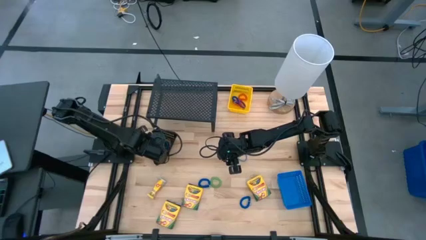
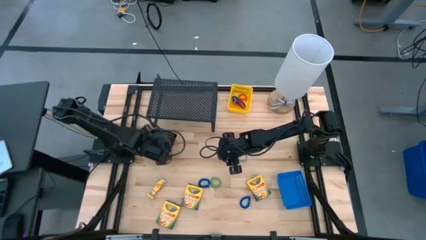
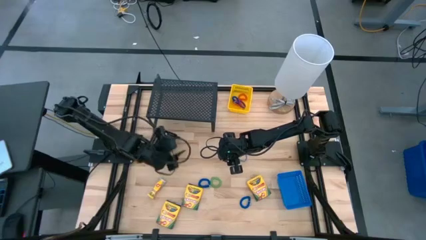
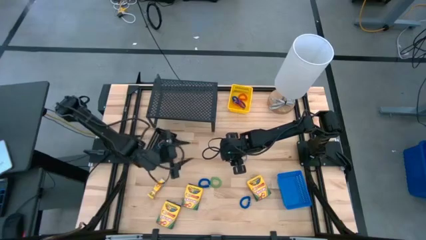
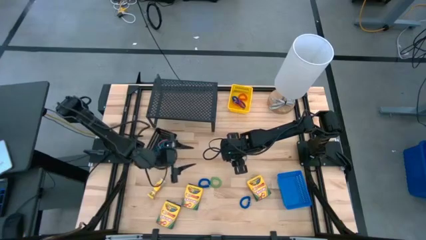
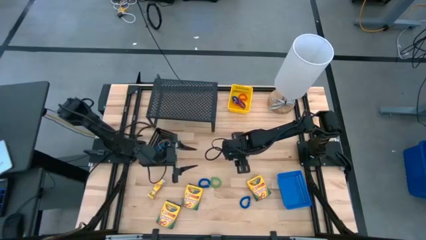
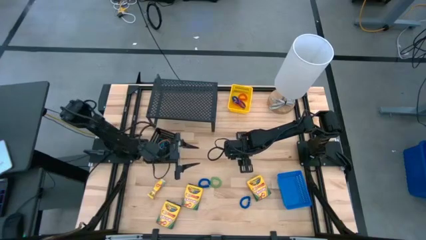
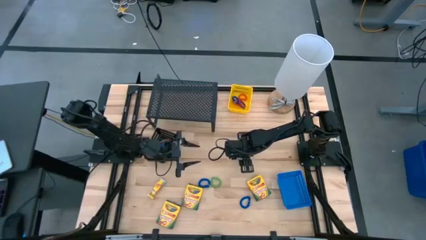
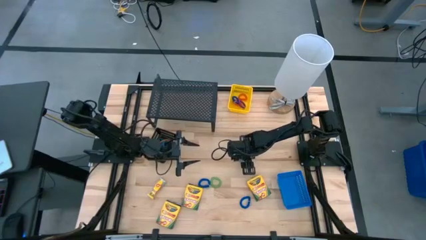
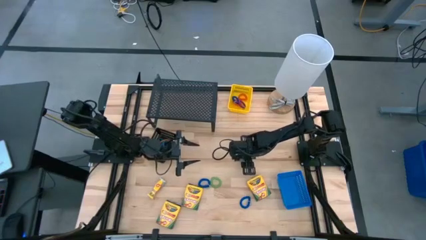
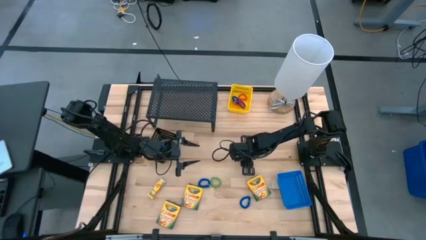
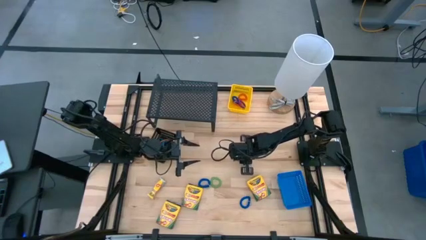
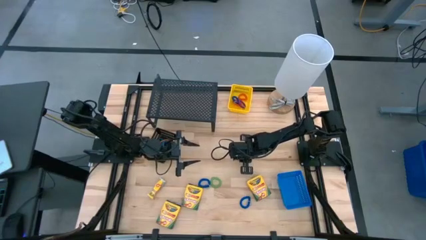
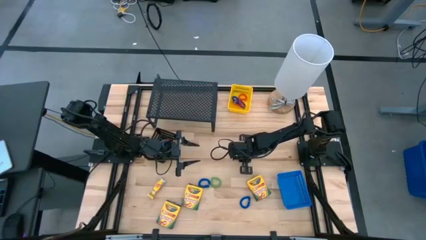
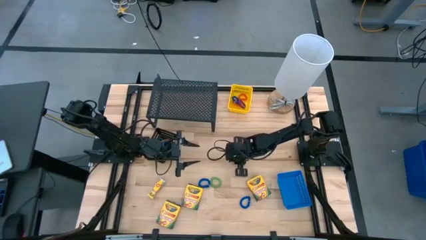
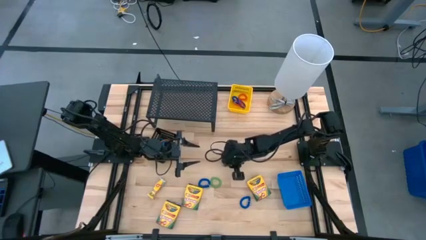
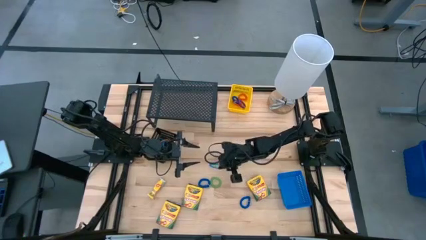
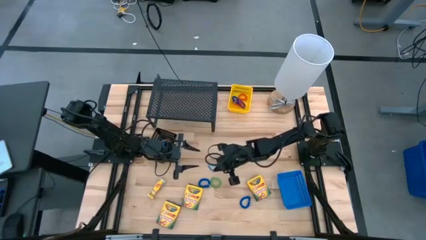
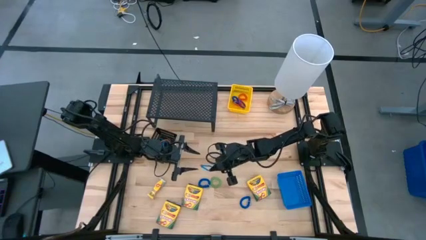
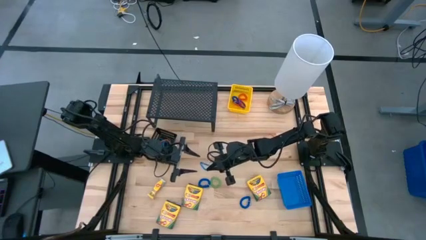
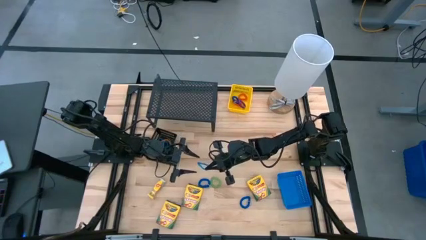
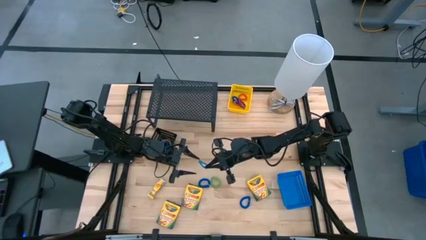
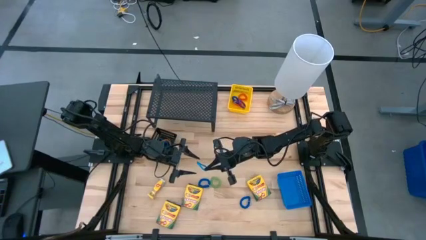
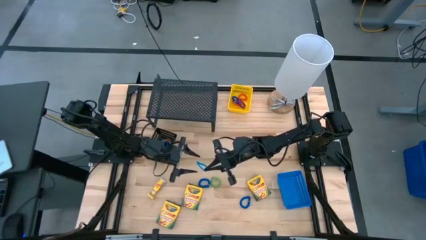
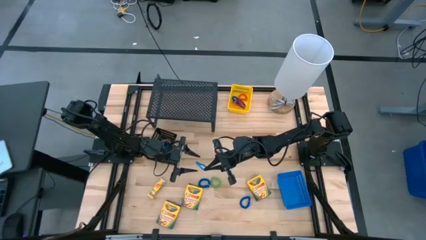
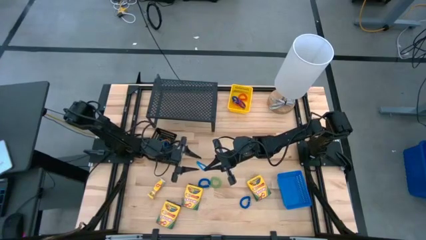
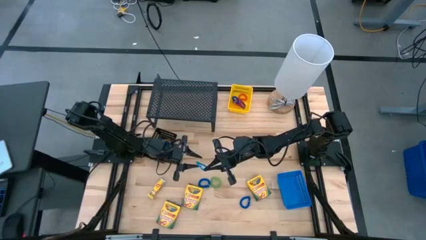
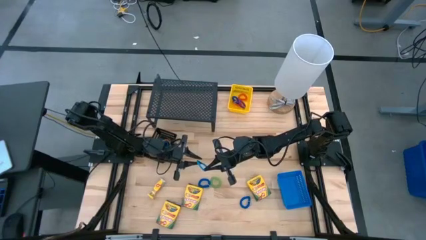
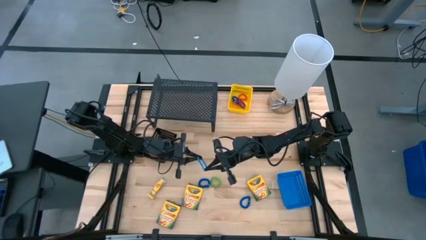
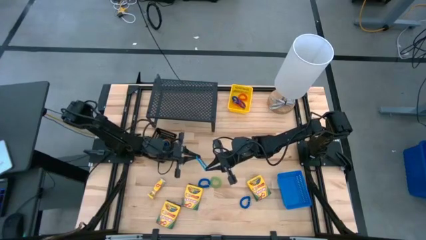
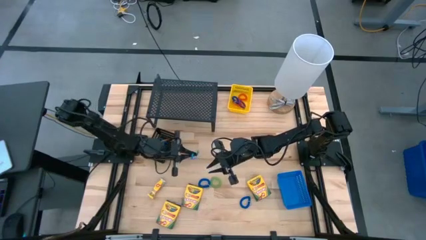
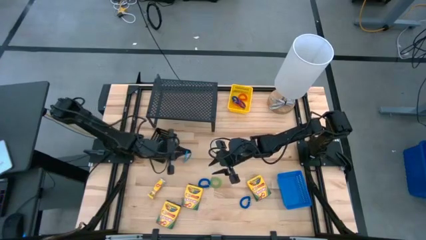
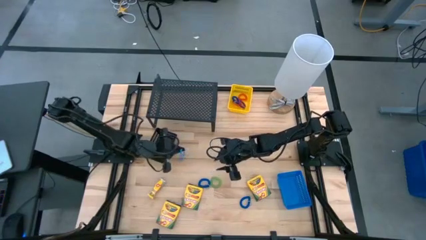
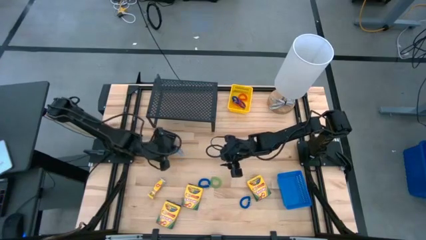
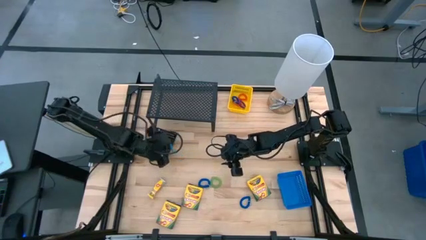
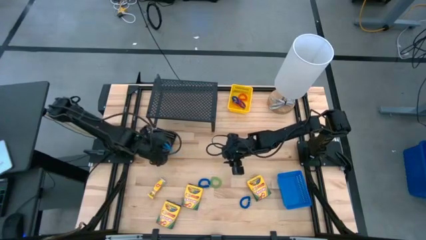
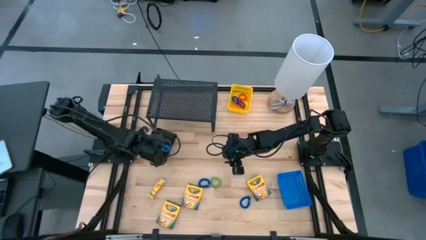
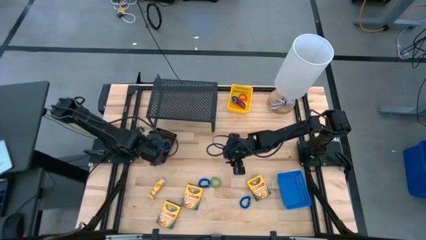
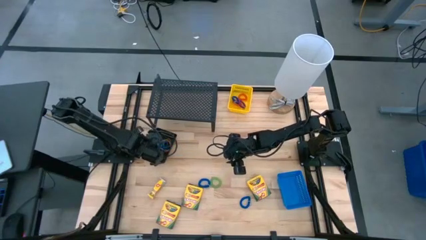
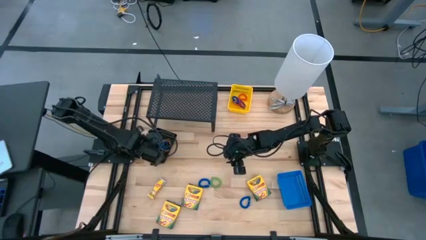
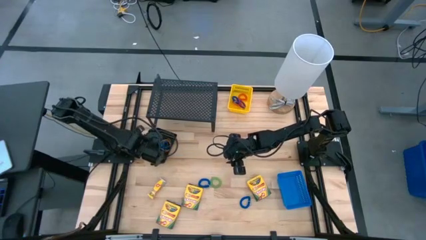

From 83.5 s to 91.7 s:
Task: Pick & Place Office Desk Supplies
Put the blue rubber band into the black bin

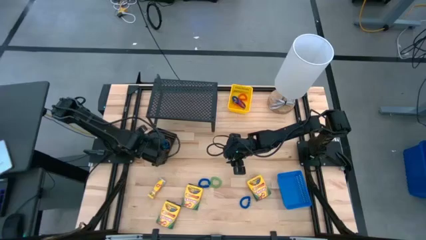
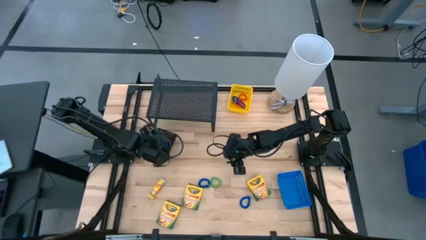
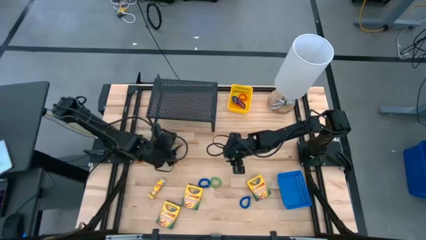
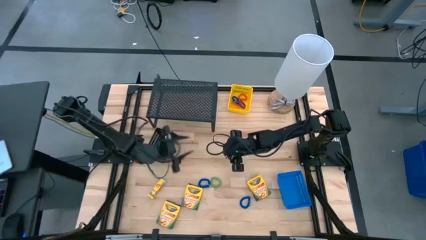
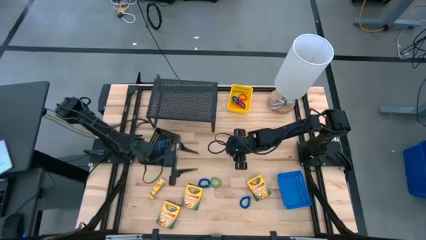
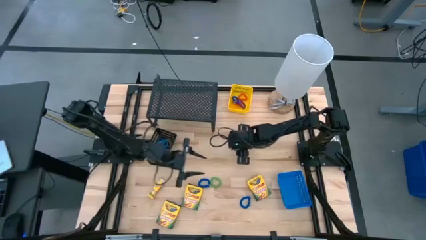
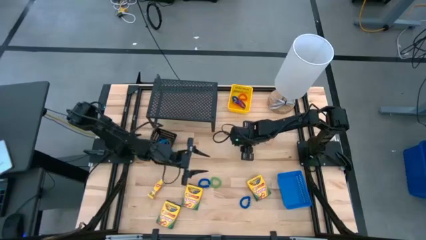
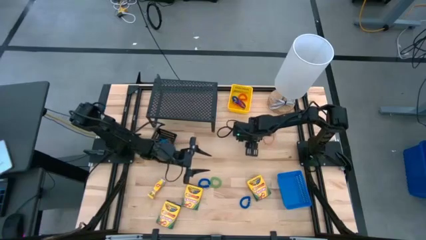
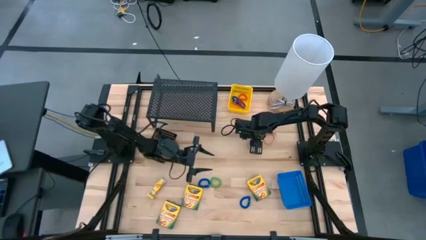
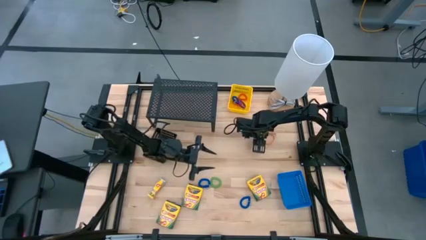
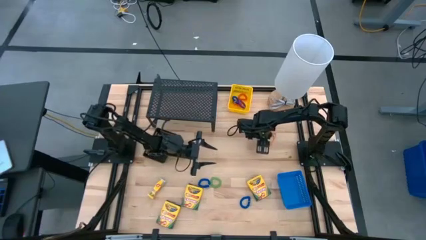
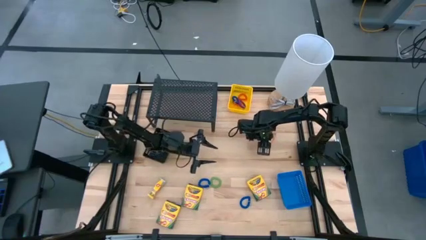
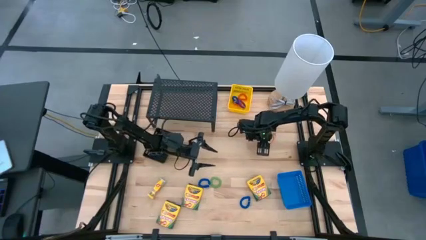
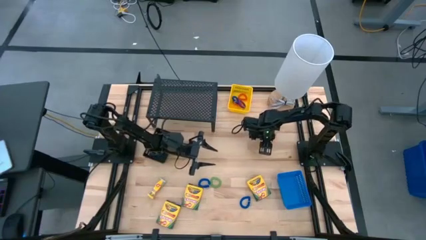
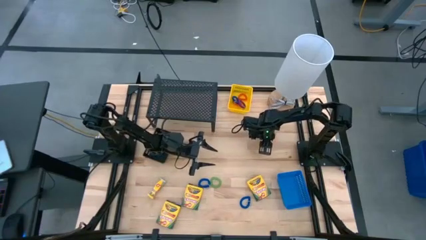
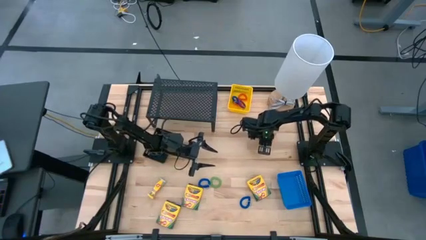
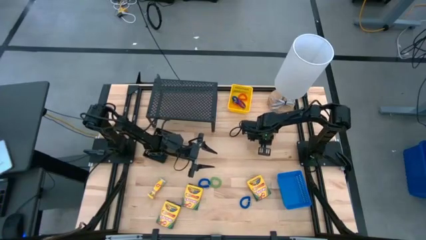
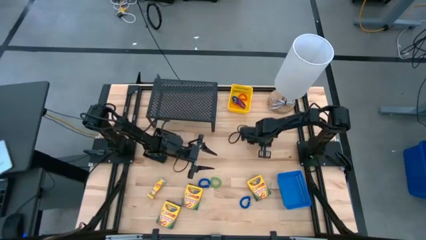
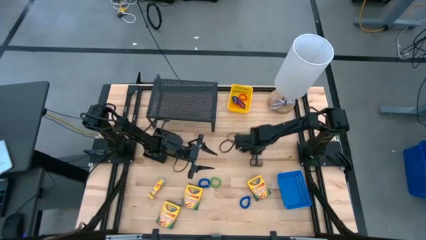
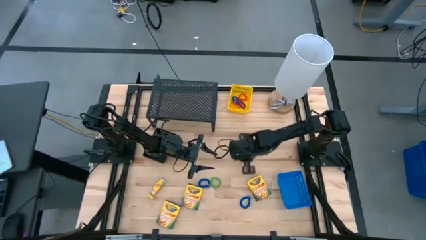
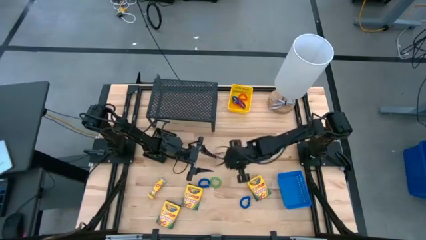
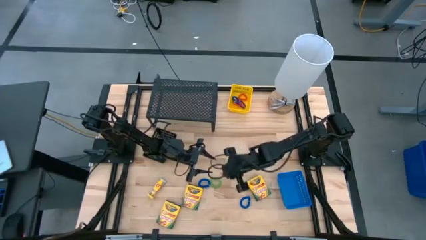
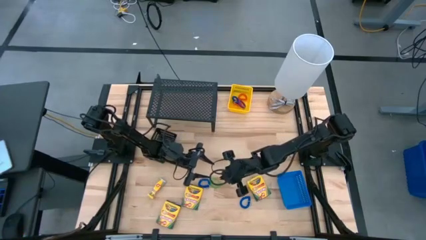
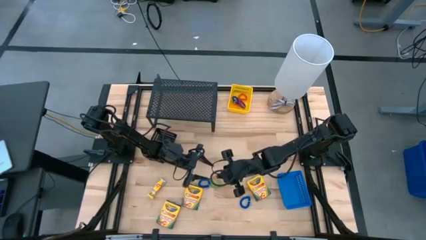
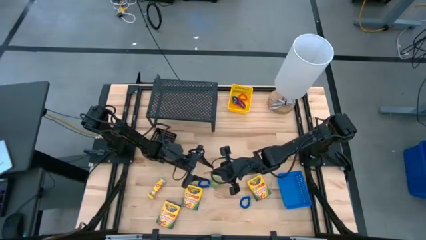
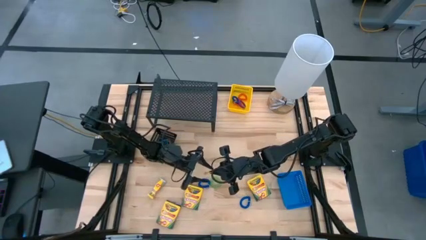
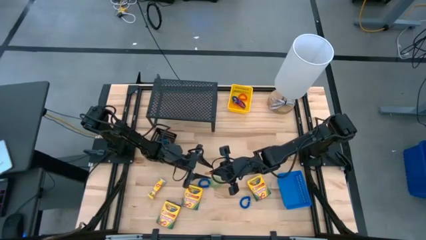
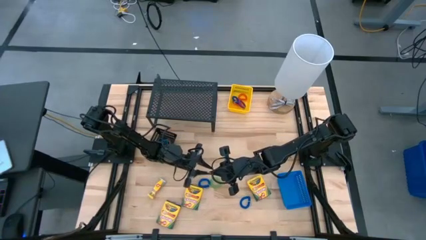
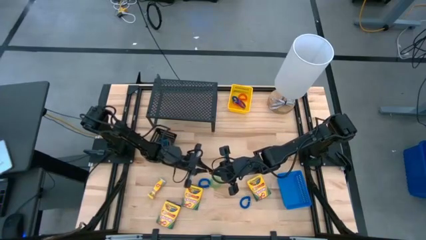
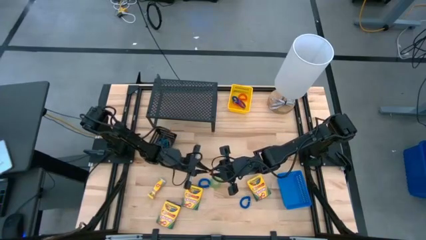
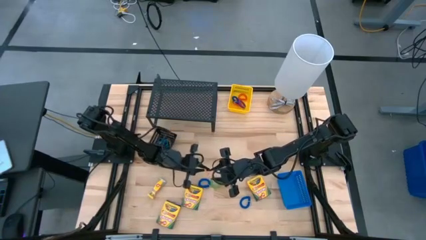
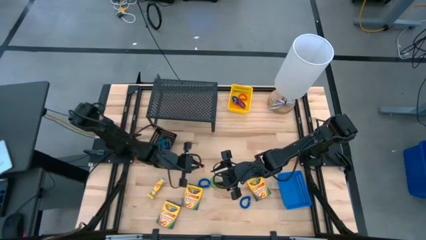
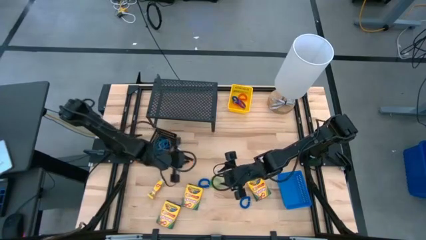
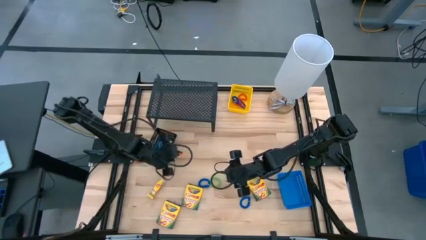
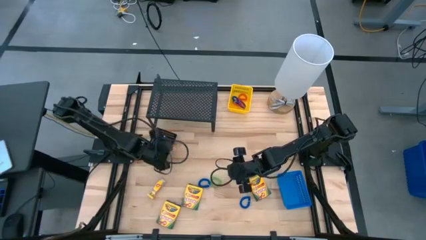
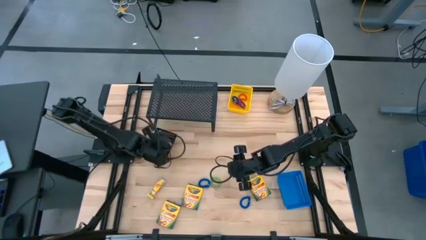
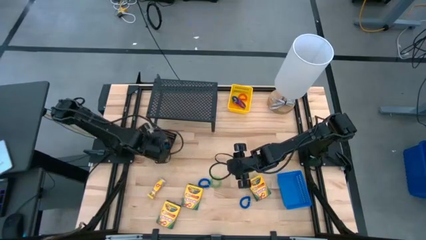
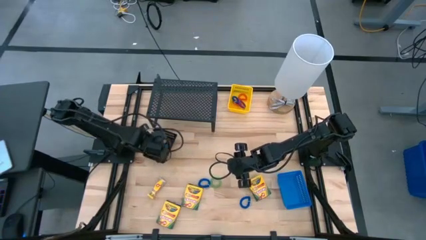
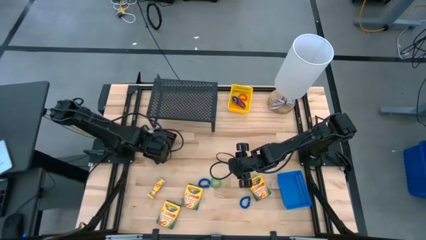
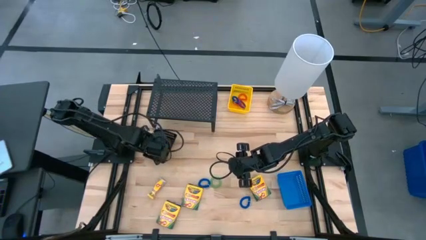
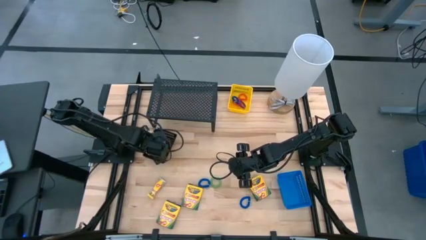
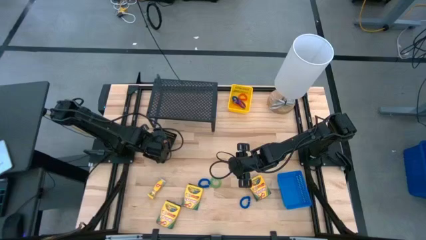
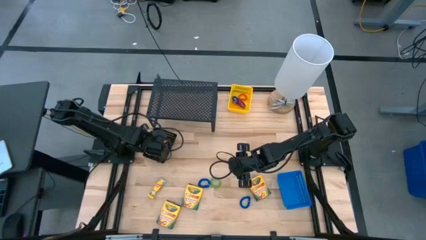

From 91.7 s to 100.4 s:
Put the orange rubber band into the black bin
